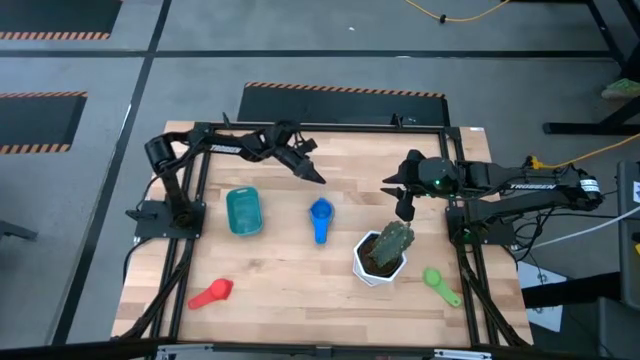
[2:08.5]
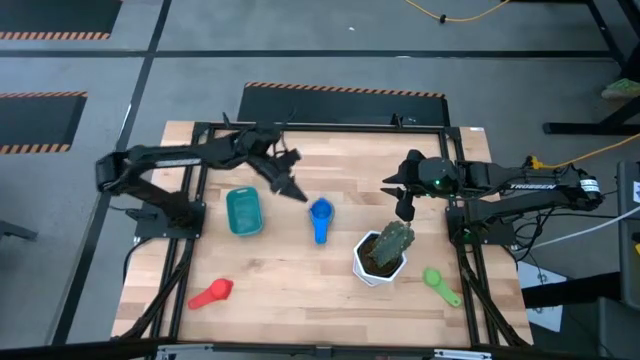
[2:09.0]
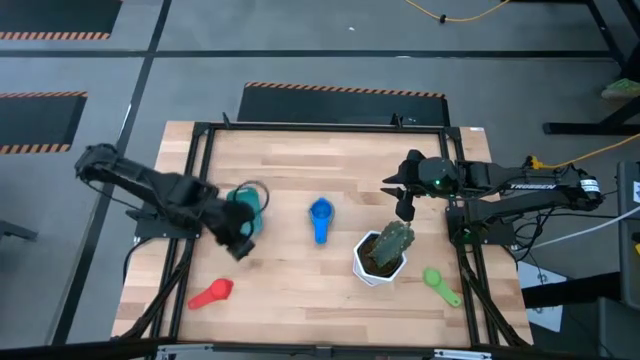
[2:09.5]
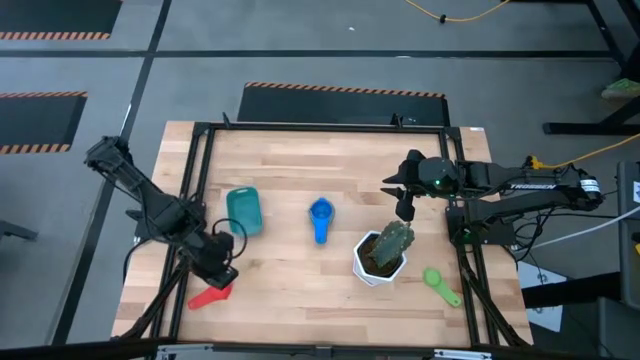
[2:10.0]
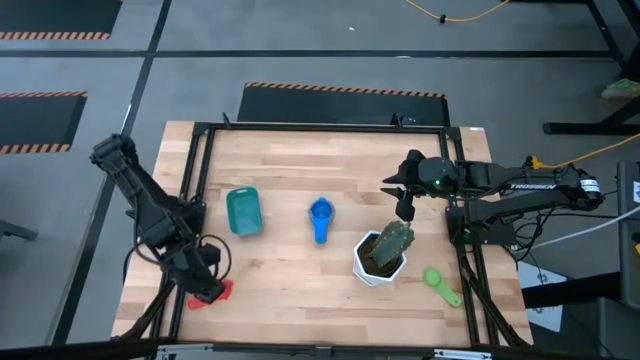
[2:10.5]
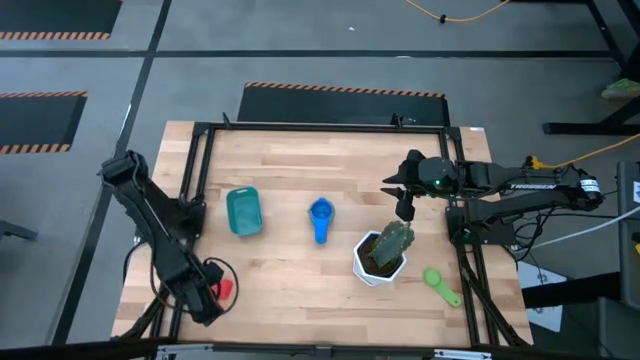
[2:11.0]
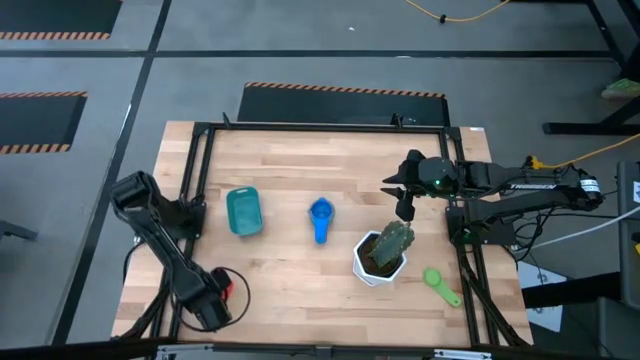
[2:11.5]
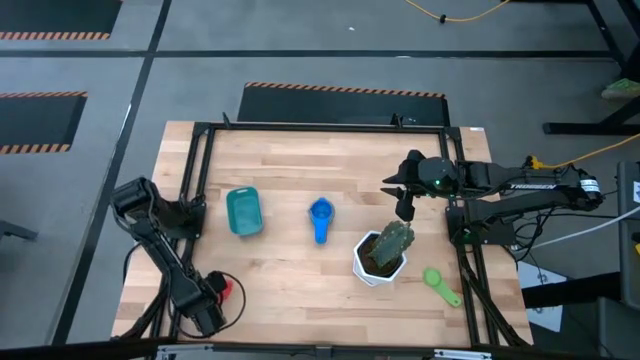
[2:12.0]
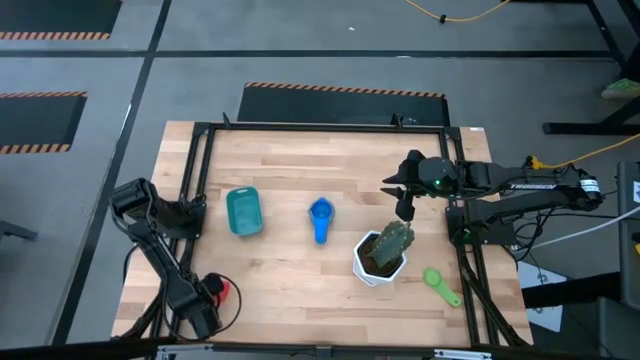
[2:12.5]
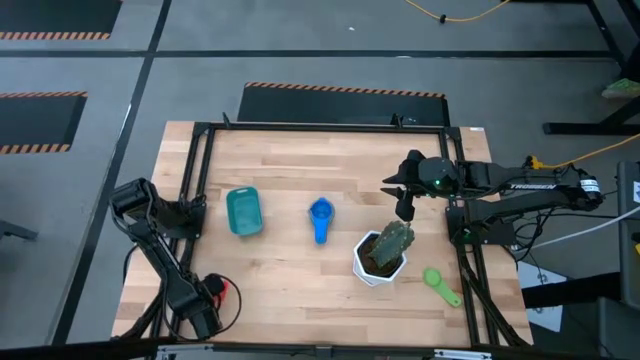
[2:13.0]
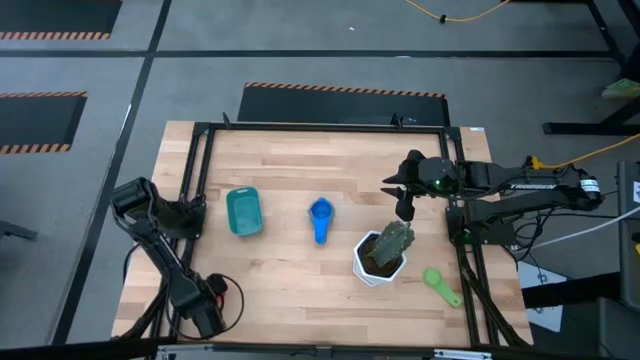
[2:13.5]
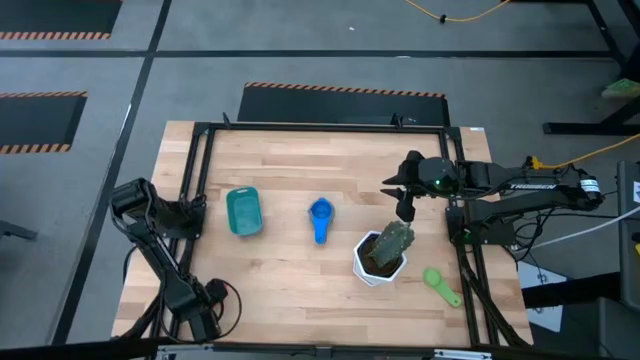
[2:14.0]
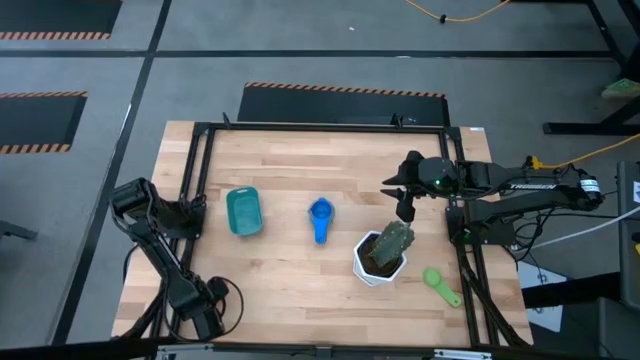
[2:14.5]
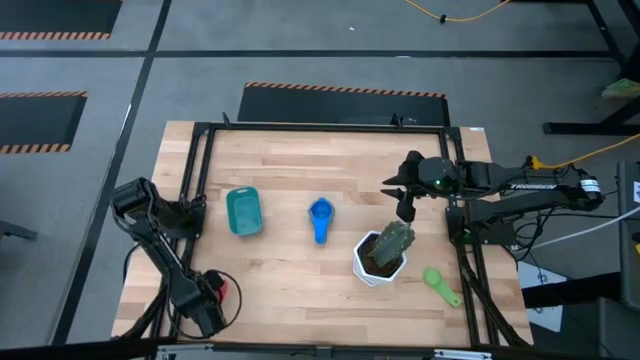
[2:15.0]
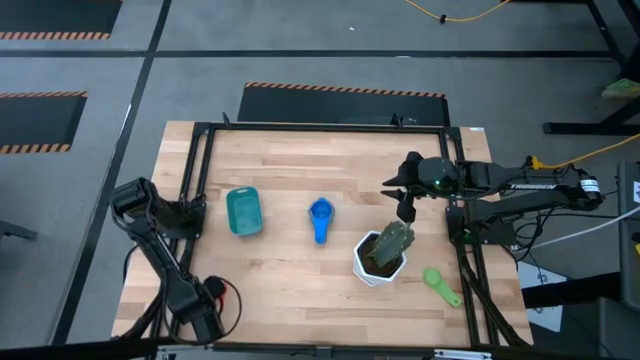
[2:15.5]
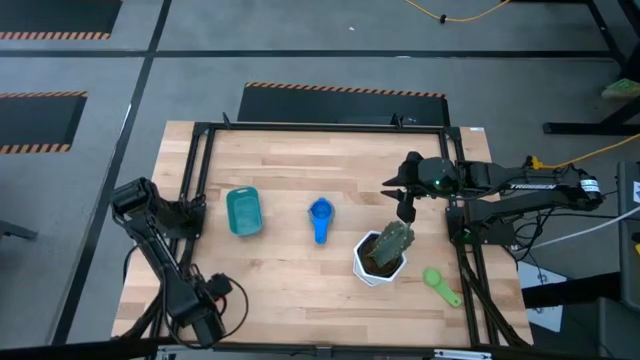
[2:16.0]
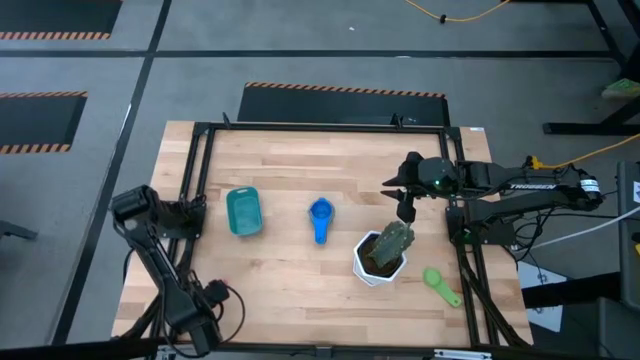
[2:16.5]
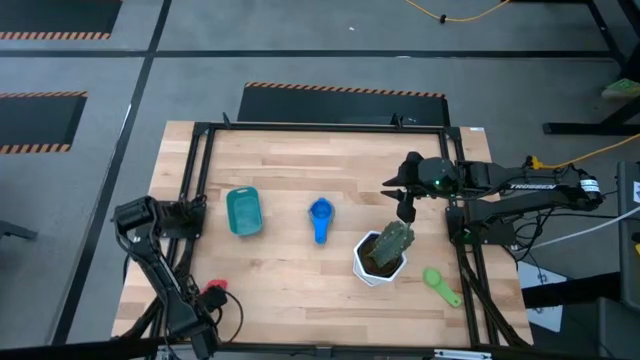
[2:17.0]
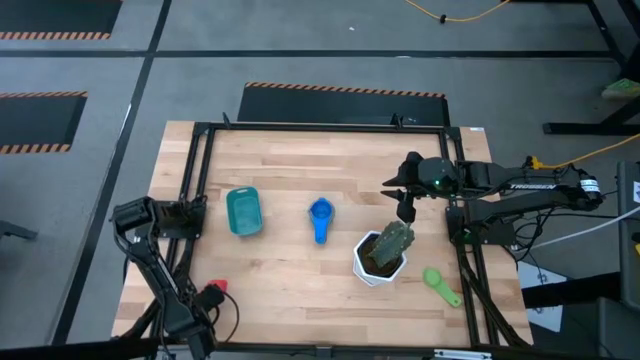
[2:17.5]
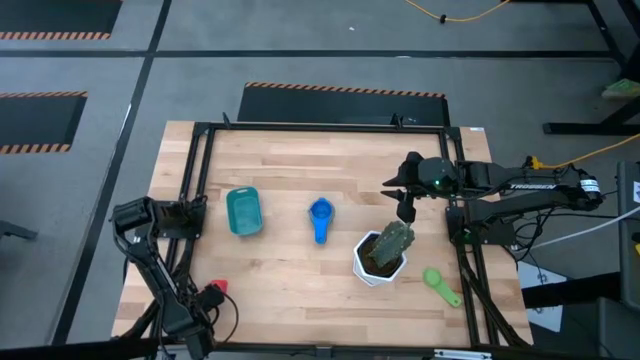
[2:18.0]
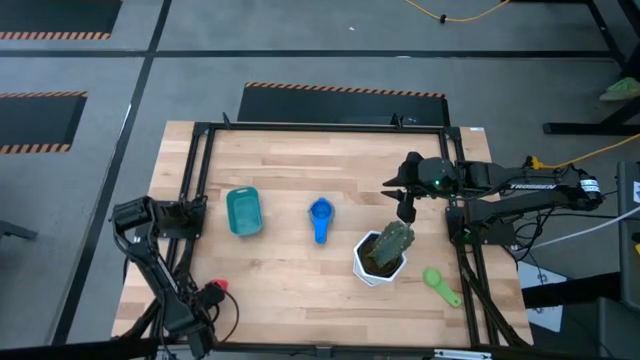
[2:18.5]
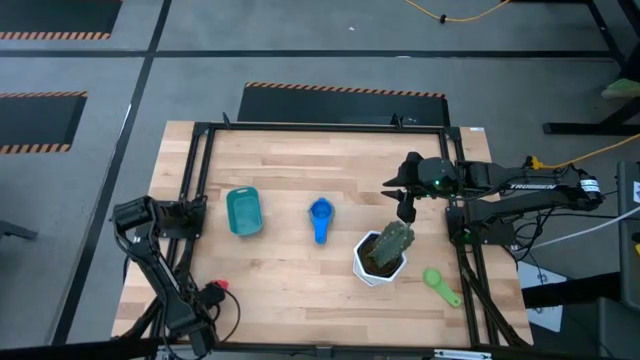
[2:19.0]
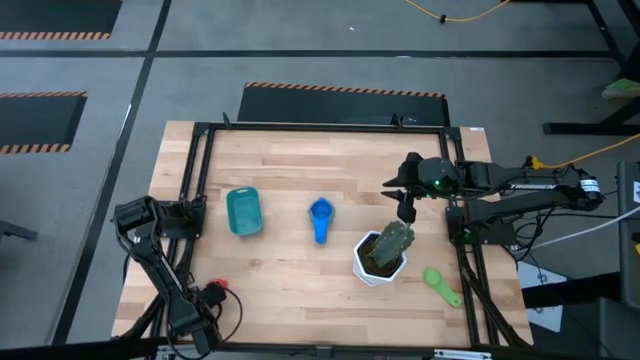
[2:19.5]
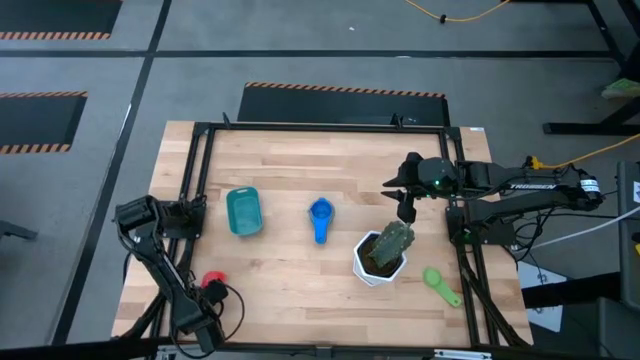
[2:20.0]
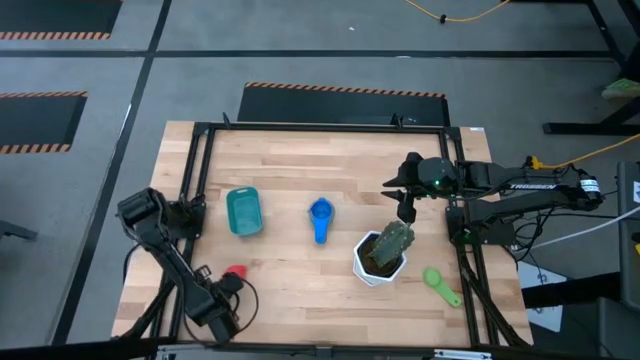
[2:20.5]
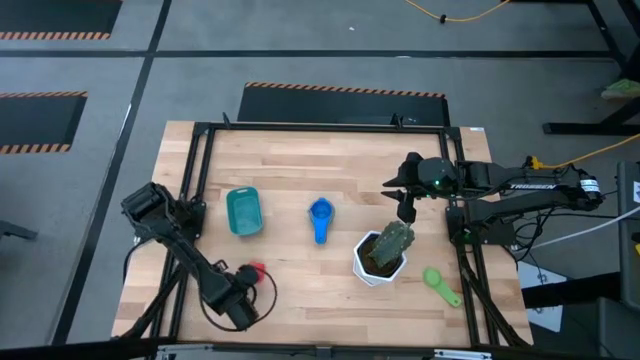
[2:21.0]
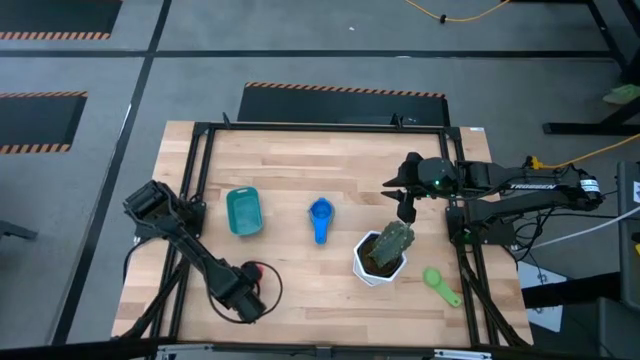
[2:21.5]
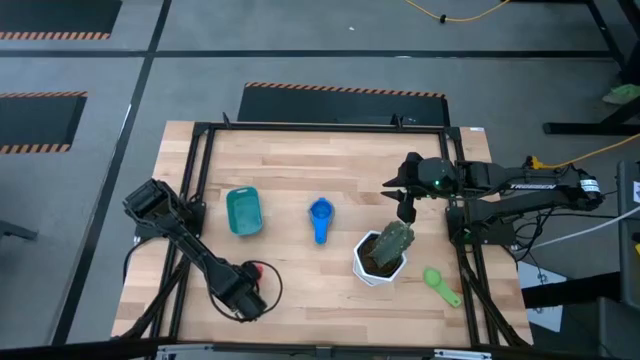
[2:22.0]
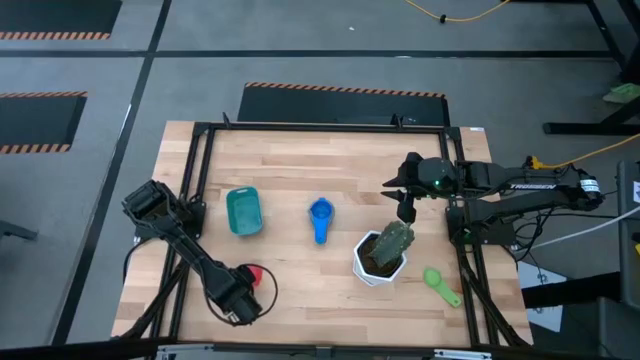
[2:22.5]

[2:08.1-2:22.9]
Task: Nest measuring cups in basket
Stack the red measuring cup on top of the blue measuring cup

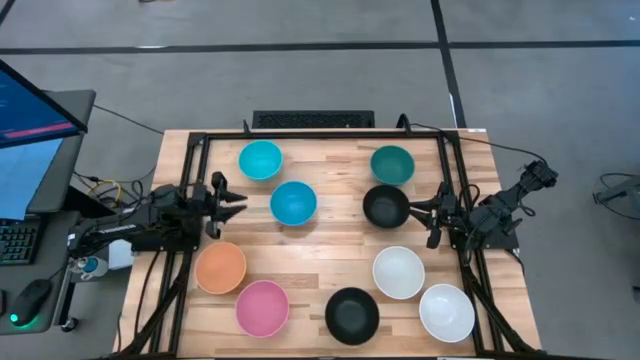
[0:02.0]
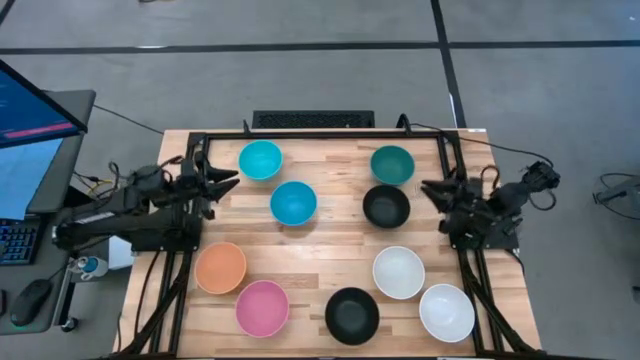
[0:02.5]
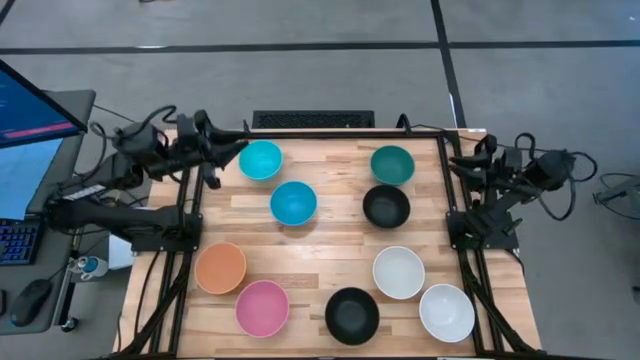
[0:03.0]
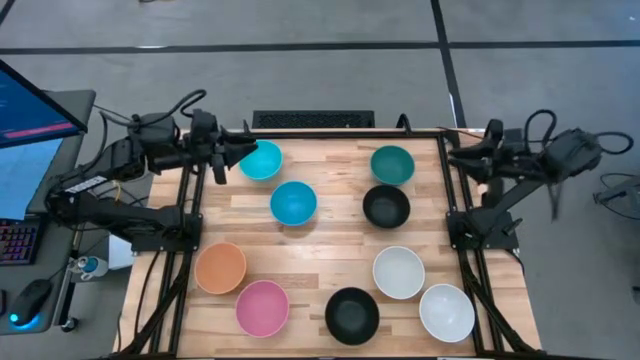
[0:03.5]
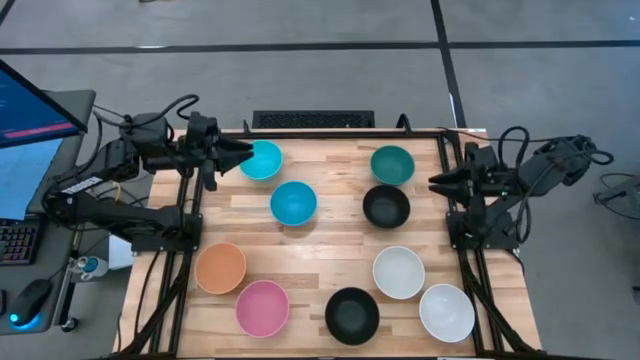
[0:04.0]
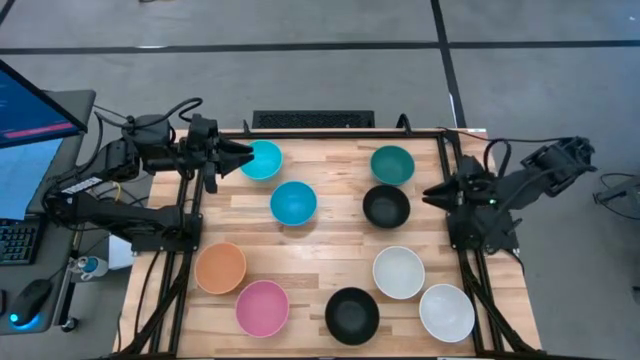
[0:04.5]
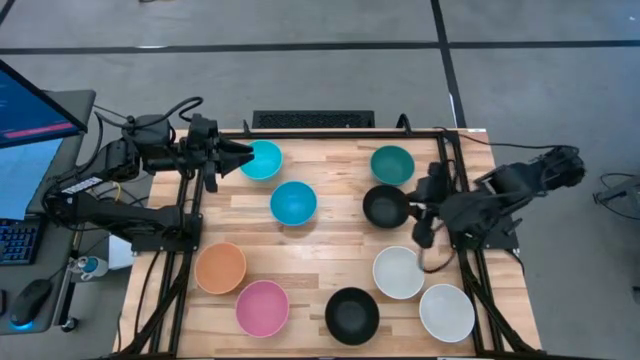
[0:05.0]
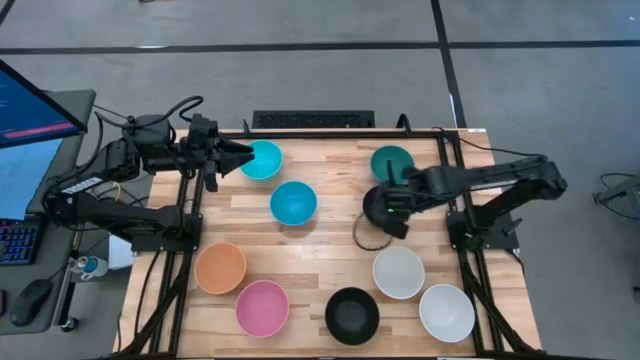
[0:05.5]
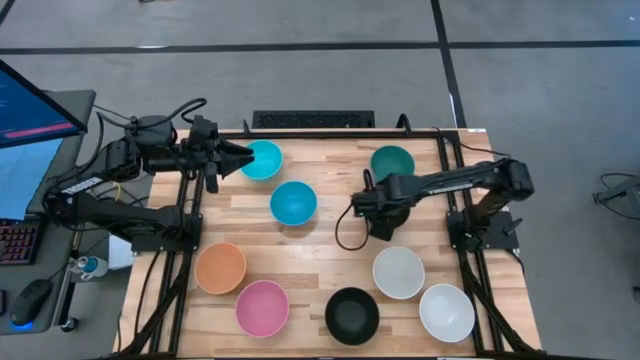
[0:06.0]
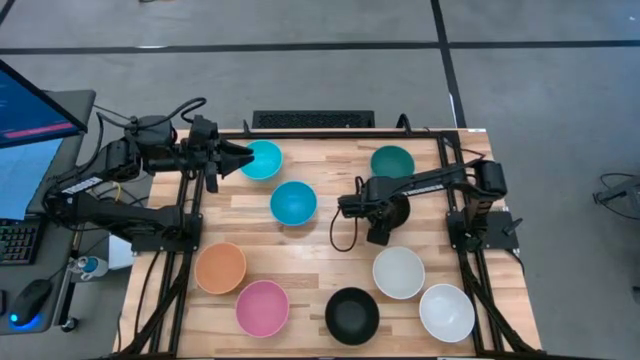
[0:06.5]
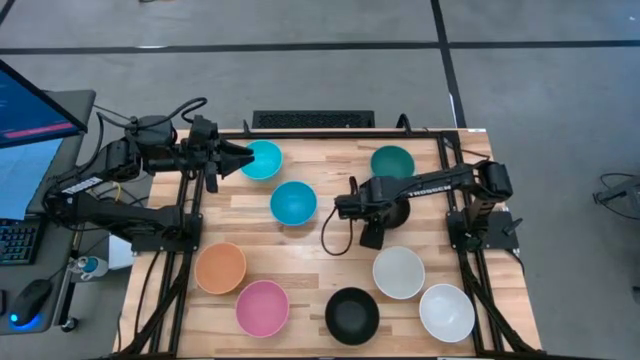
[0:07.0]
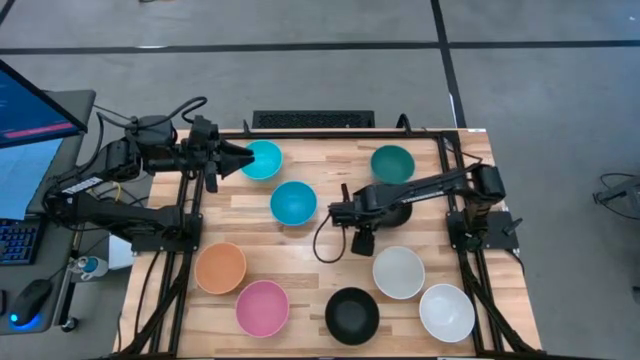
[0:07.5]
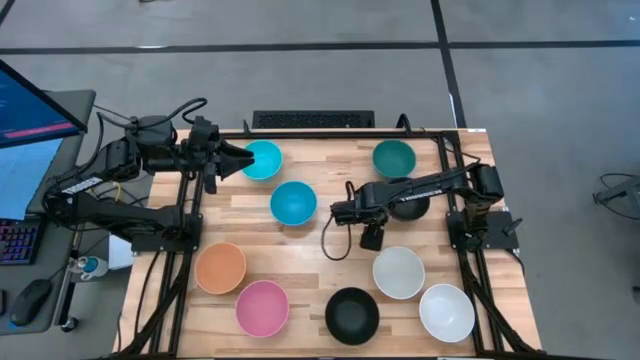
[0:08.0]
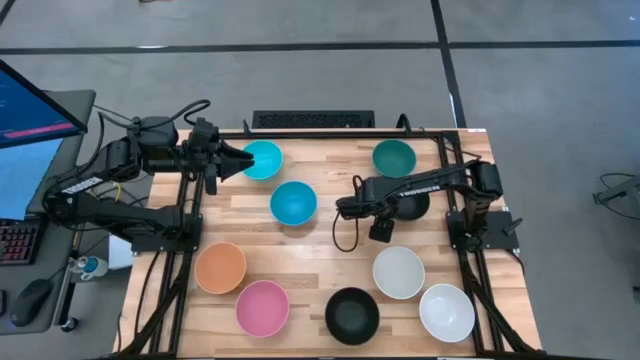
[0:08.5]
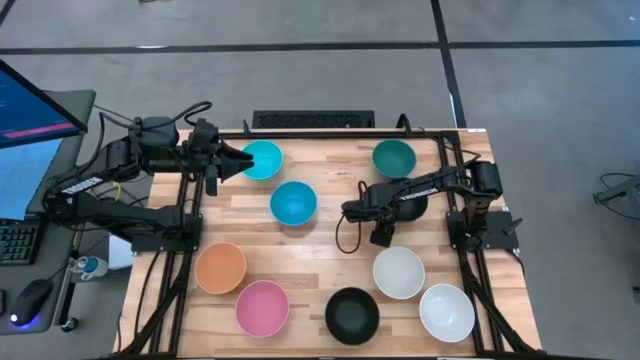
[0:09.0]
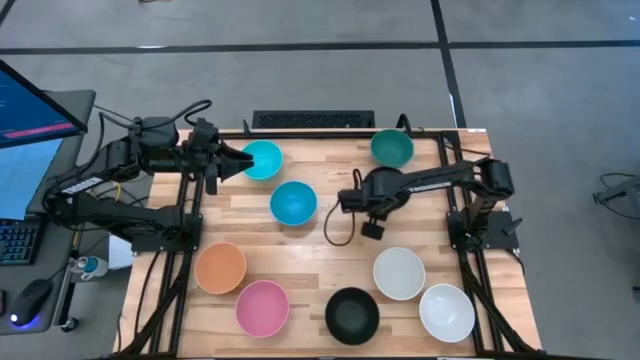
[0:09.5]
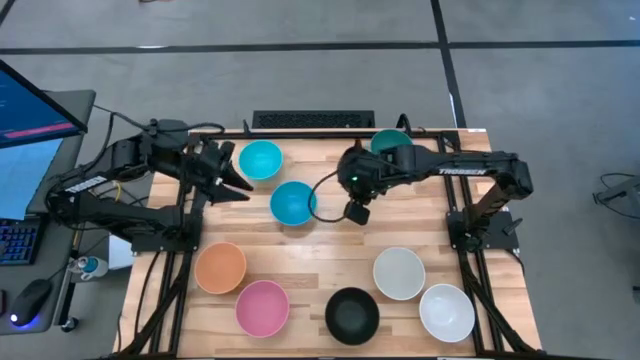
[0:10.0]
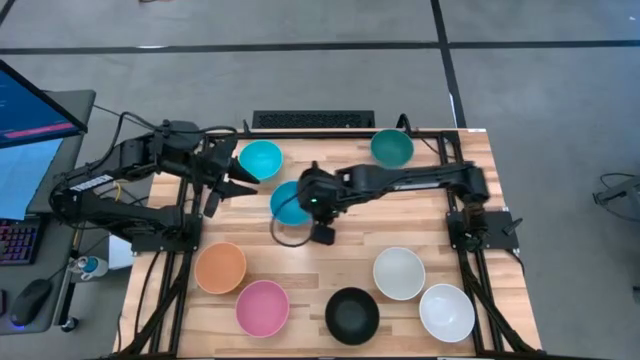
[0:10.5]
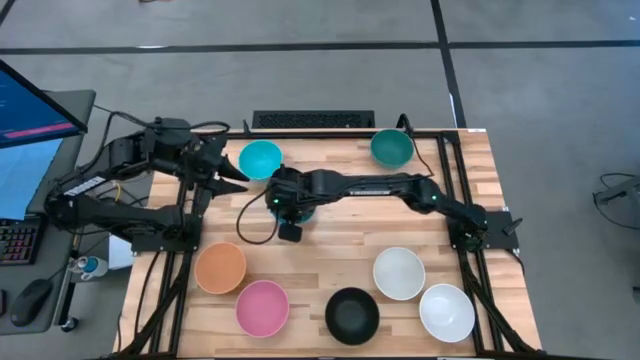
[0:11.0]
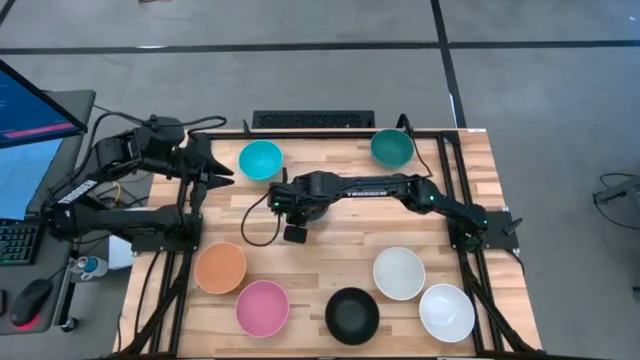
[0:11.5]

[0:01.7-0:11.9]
Task: Nest bowls inside each other
Stack the top black bowl on top of the blue bowl
